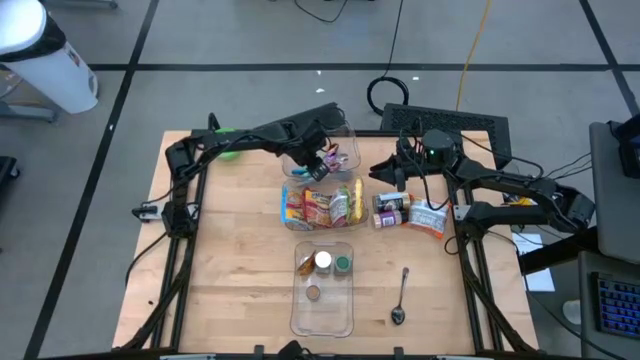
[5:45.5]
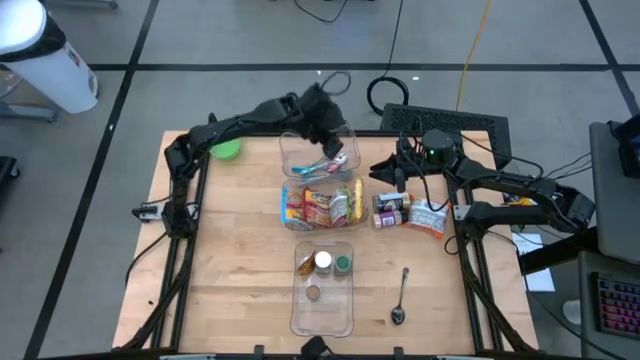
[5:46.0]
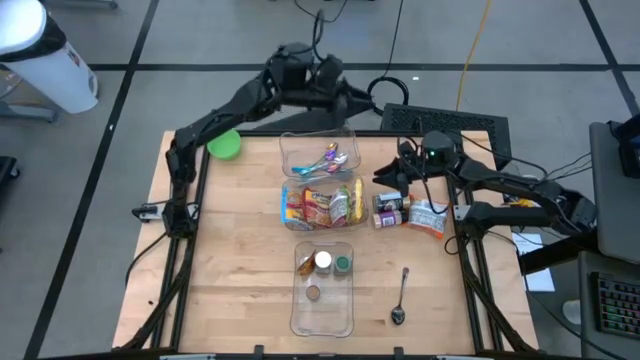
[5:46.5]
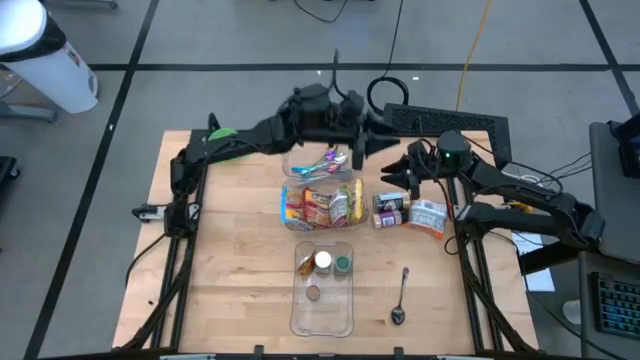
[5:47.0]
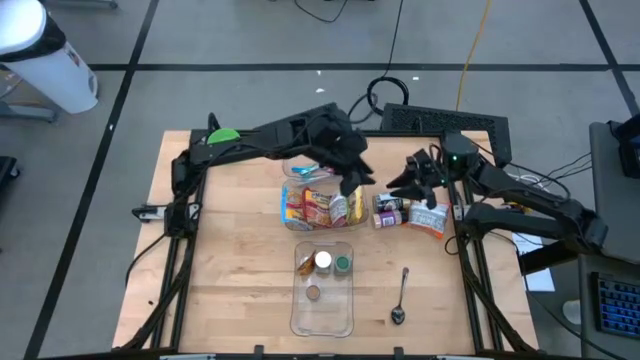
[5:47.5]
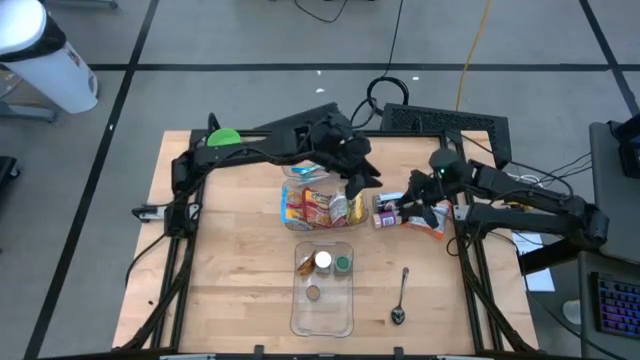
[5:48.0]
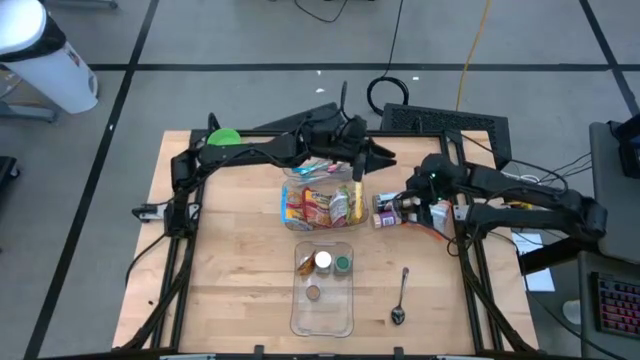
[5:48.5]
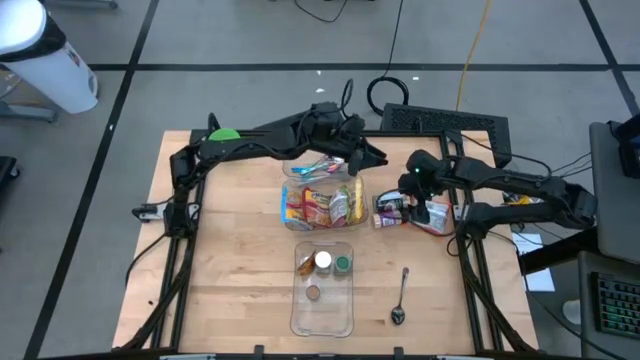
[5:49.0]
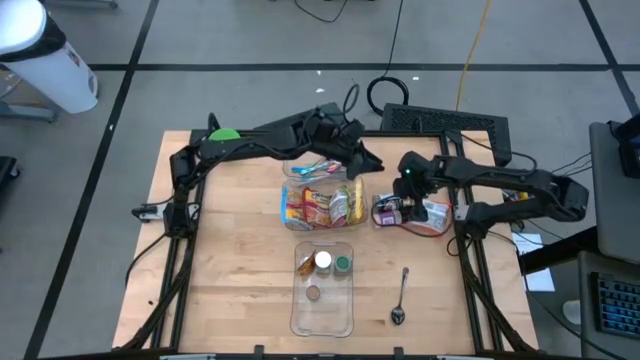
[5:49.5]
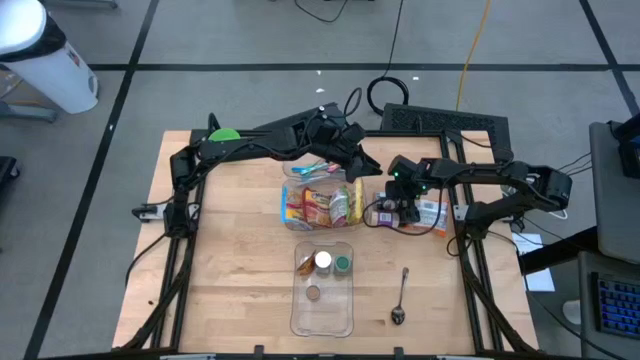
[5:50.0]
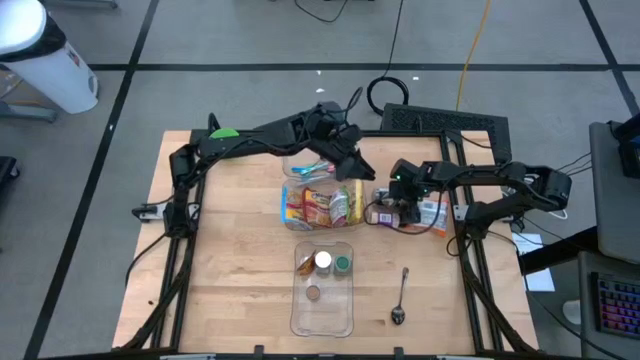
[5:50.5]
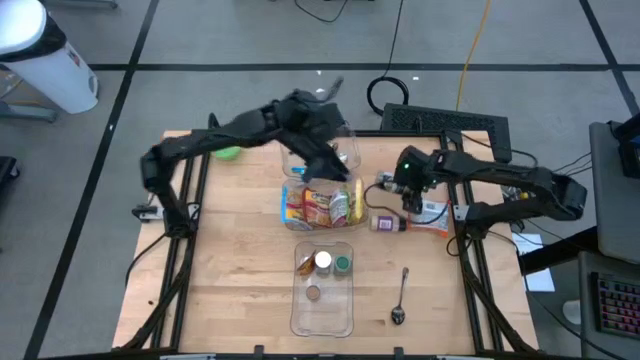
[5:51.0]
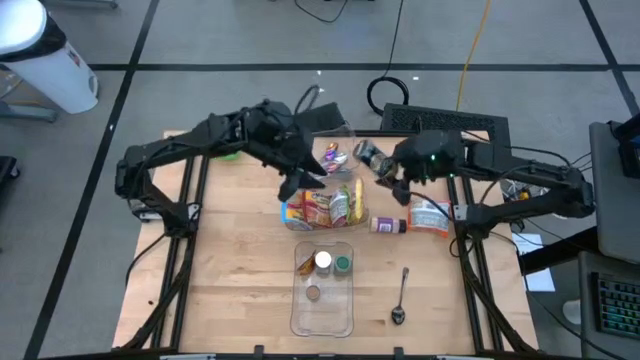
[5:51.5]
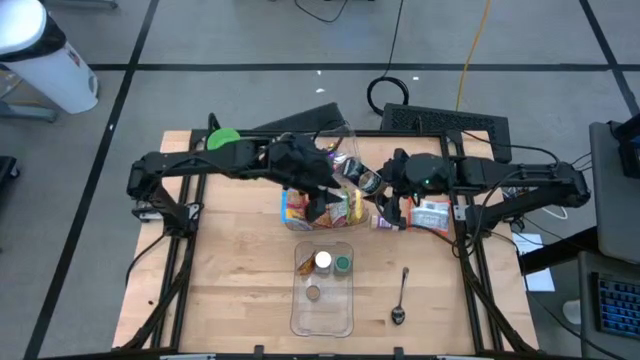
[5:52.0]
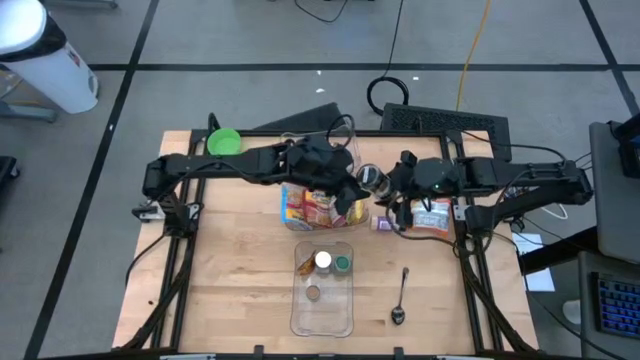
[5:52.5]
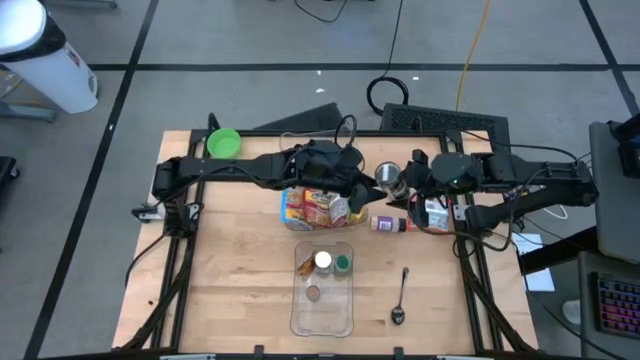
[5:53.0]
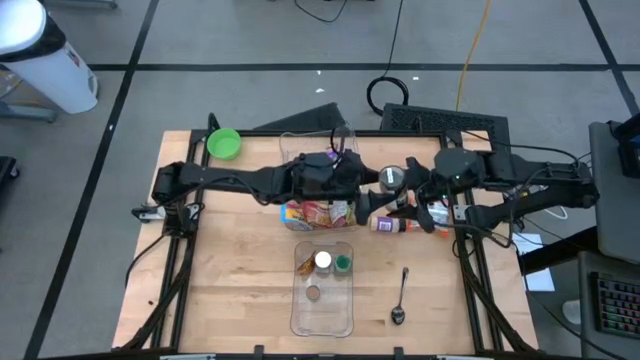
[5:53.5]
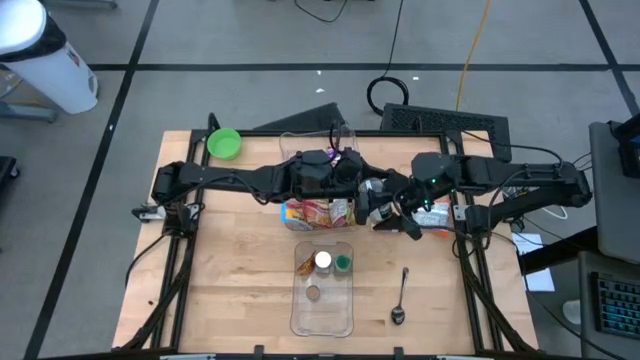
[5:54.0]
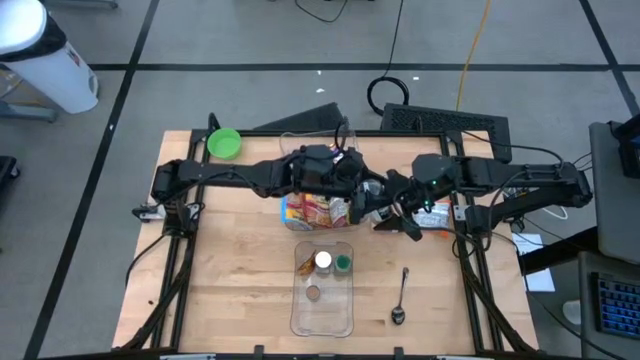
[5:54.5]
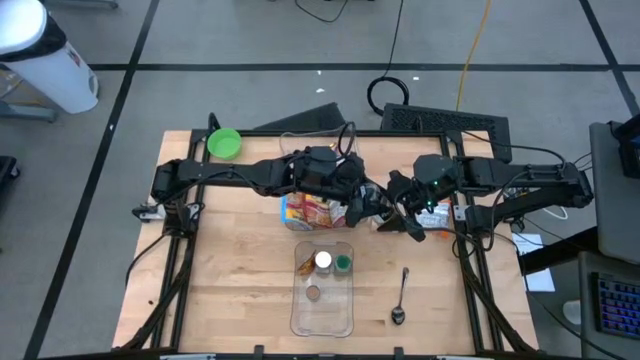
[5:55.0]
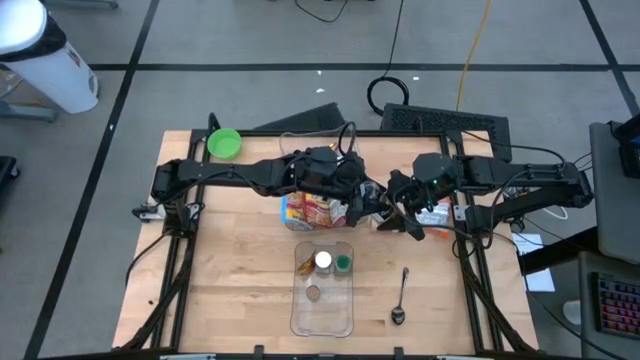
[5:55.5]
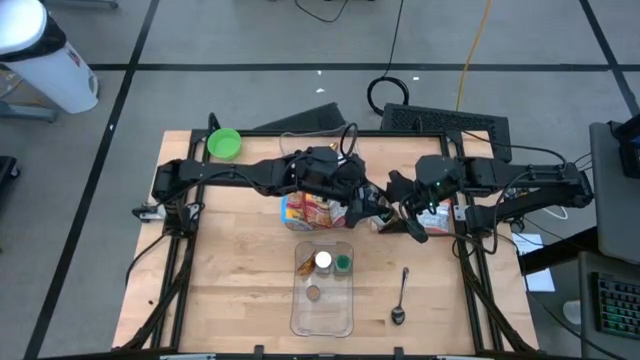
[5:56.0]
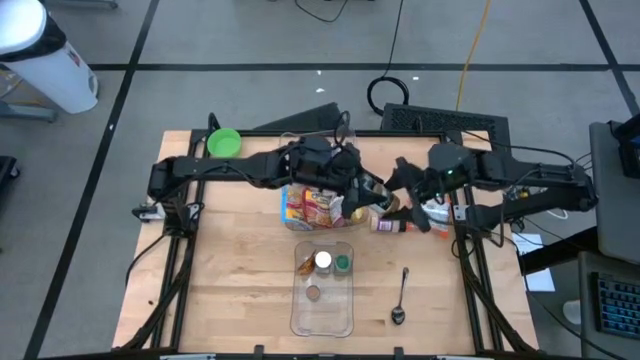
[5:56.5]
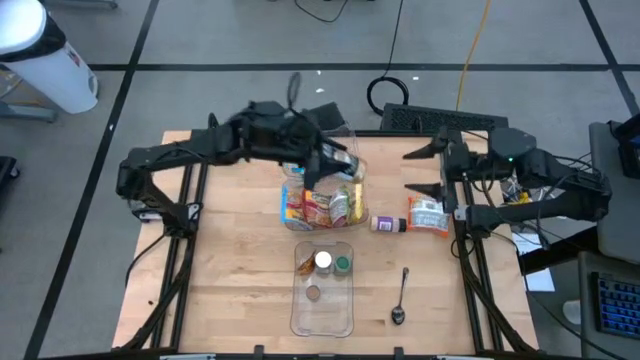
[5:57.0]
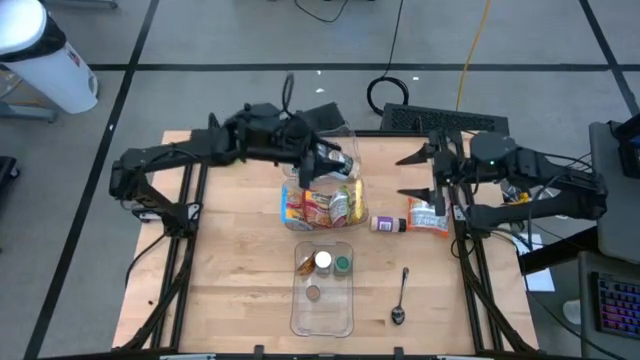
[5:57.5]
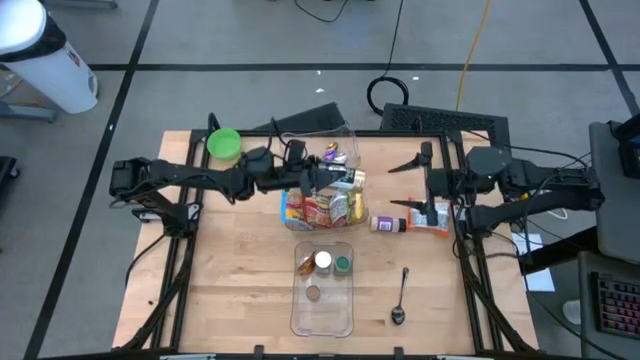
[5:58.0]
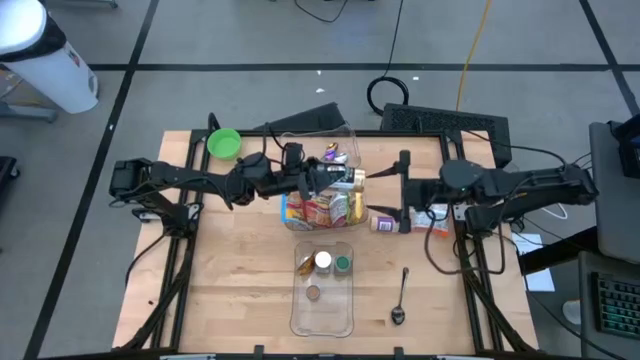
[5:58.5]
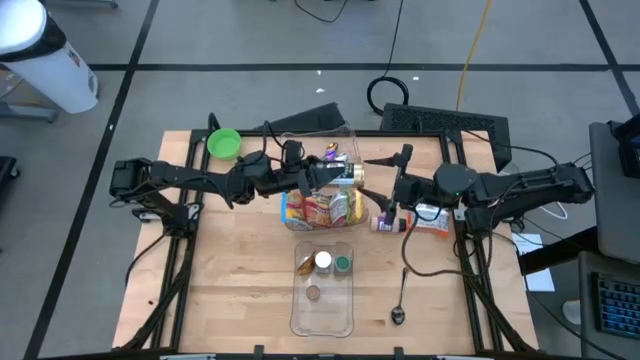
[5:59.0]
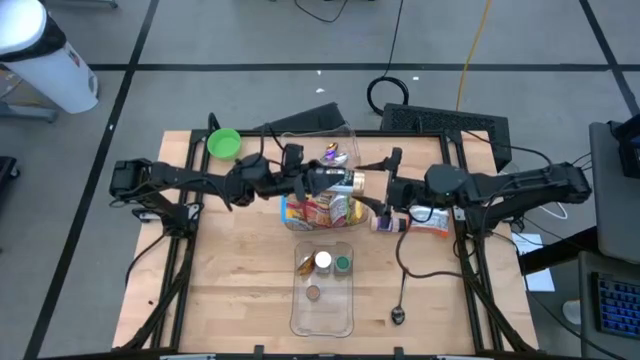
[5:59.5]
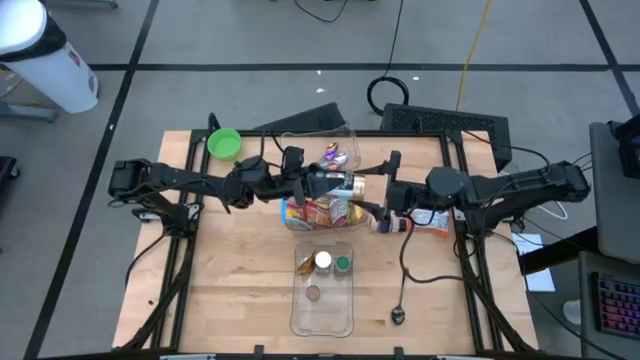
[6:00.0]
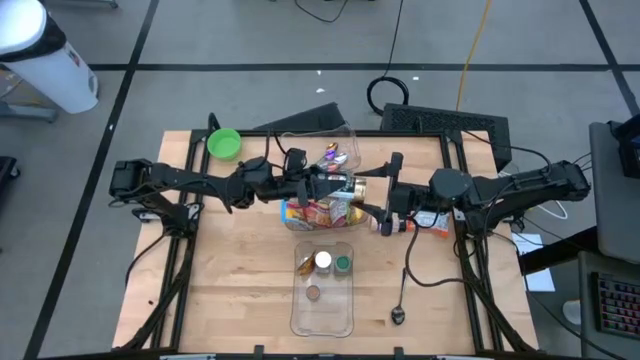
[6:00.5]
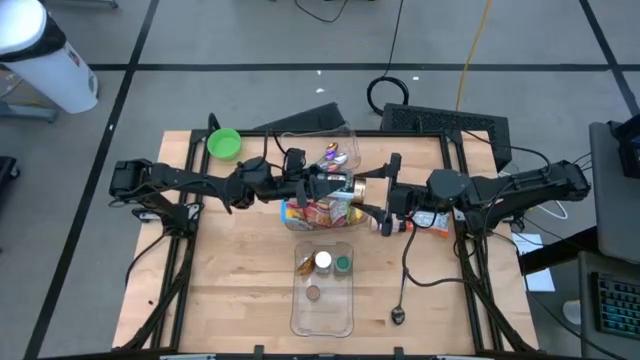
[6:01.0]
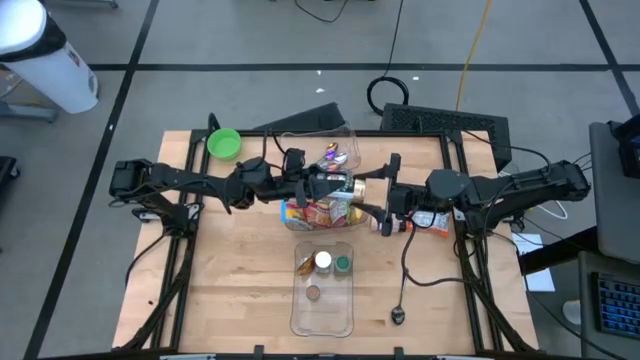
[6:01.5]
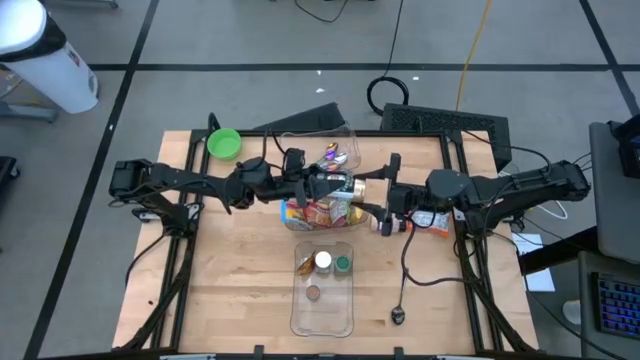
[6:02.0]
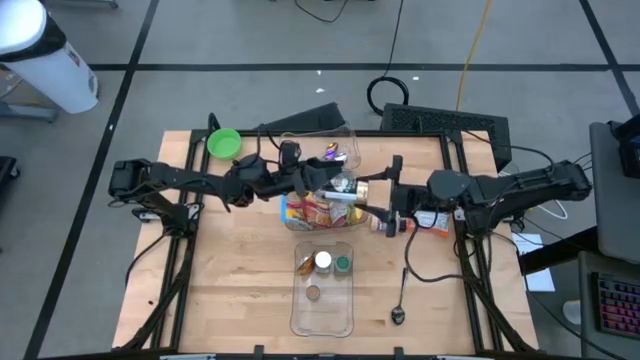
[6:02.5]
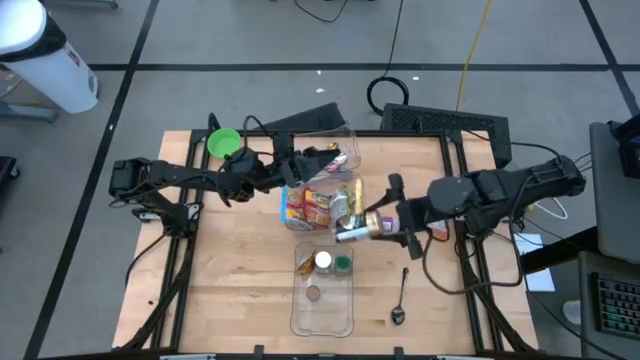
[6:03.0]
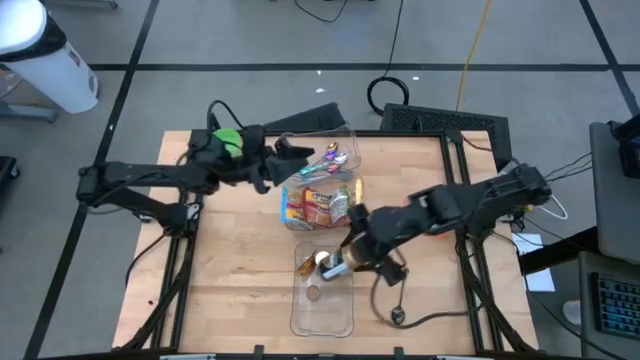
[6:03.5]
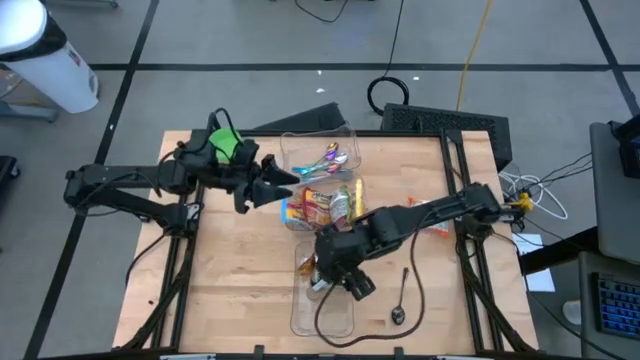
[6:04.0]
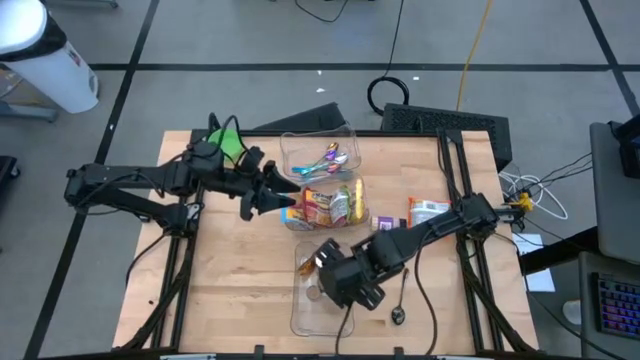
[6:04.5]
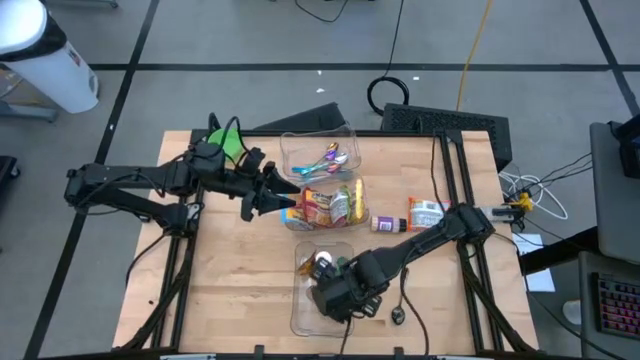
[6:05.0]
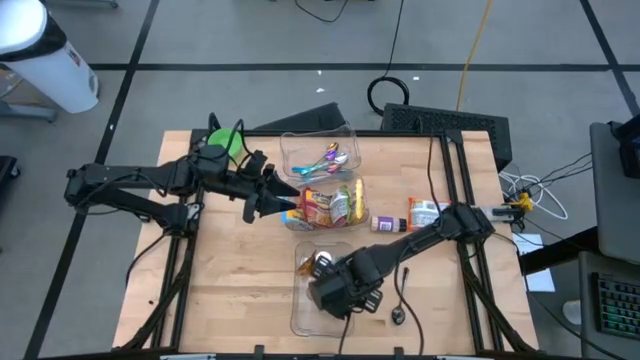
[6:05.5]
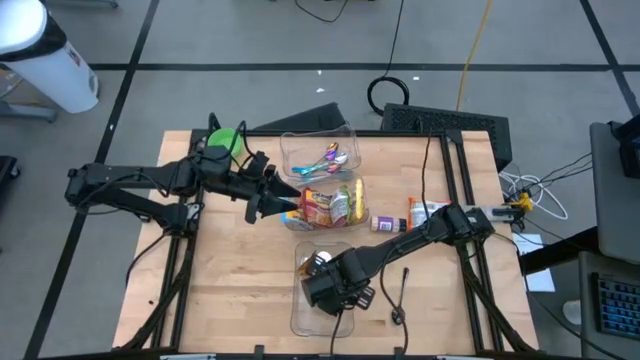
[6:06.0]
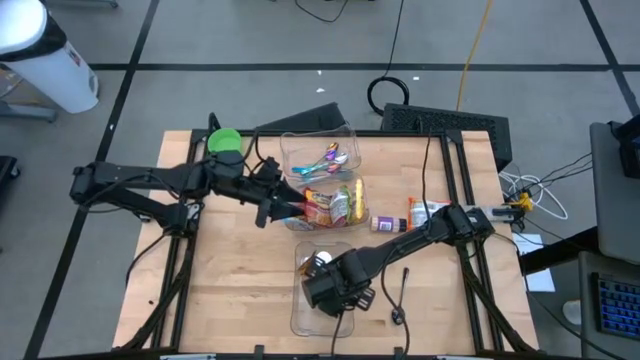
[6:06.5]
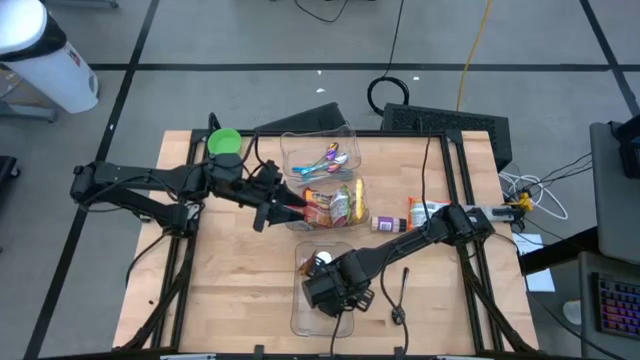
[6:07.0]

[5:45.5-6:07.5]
Task: Pick & Place Food Item
Put the golden seasoning bottle into the bottom transparent bin
